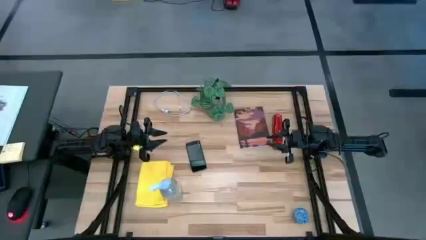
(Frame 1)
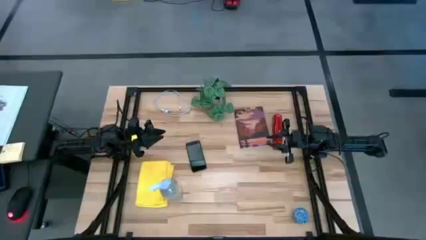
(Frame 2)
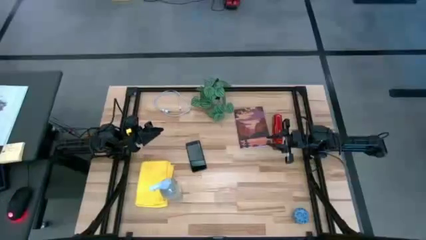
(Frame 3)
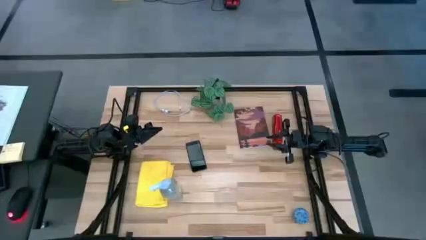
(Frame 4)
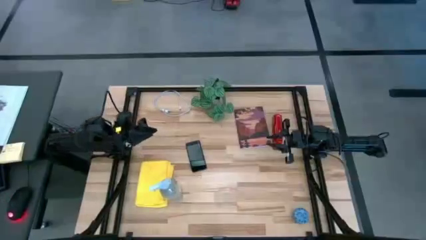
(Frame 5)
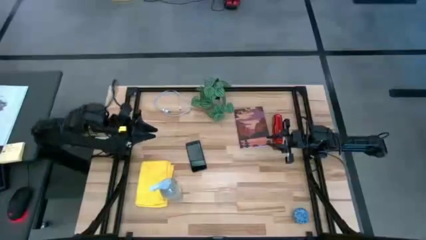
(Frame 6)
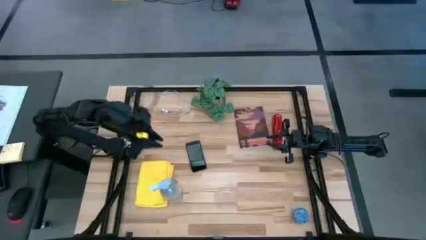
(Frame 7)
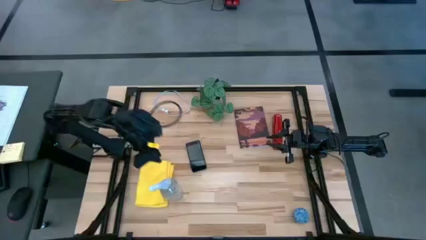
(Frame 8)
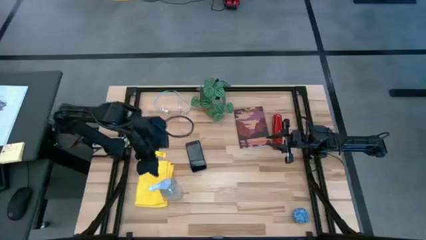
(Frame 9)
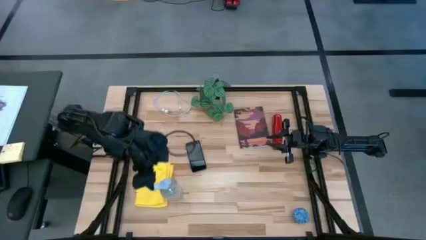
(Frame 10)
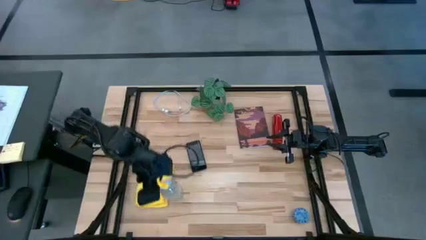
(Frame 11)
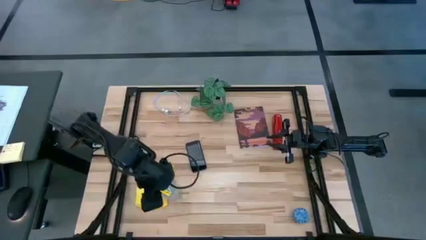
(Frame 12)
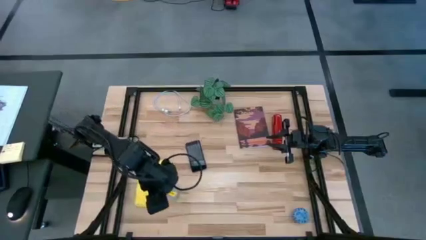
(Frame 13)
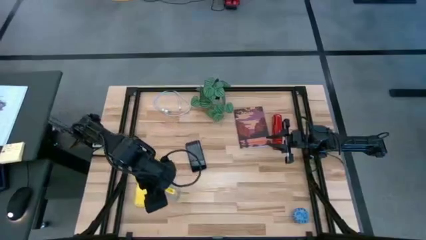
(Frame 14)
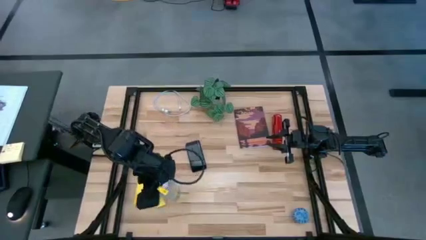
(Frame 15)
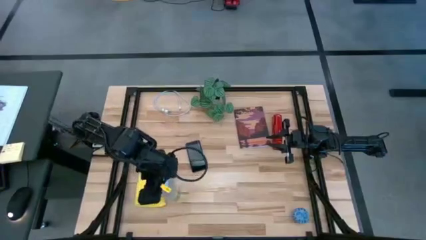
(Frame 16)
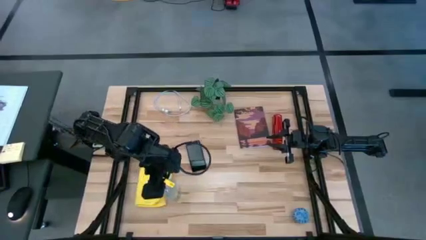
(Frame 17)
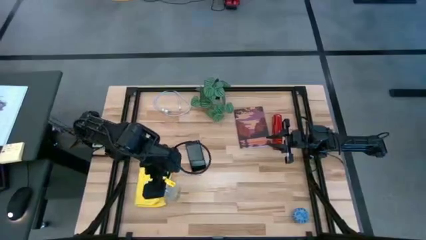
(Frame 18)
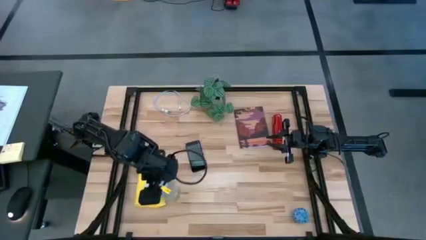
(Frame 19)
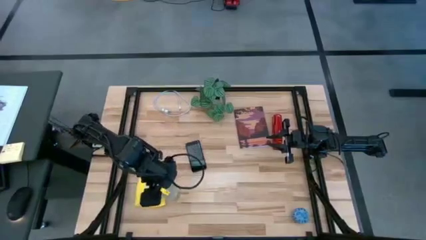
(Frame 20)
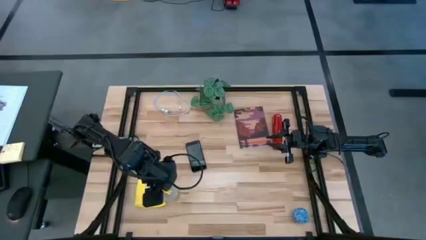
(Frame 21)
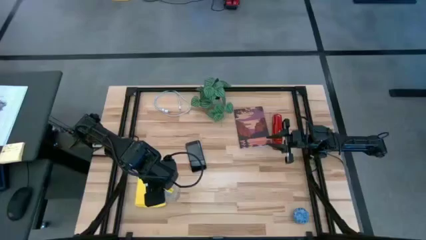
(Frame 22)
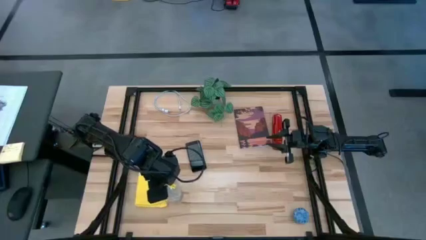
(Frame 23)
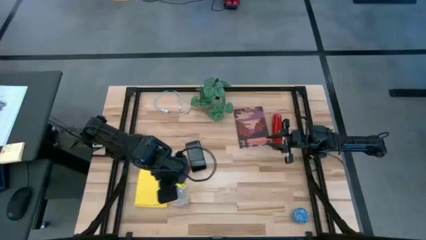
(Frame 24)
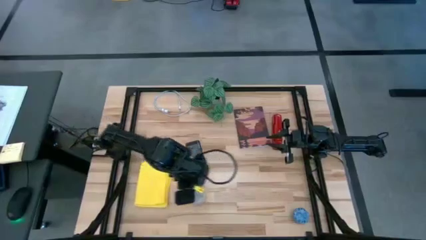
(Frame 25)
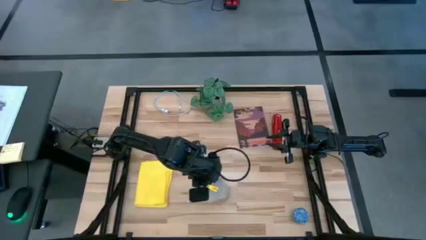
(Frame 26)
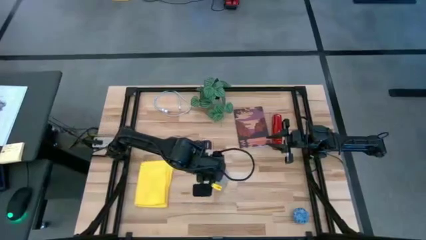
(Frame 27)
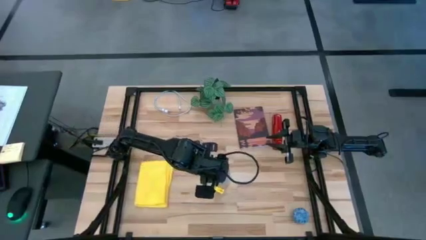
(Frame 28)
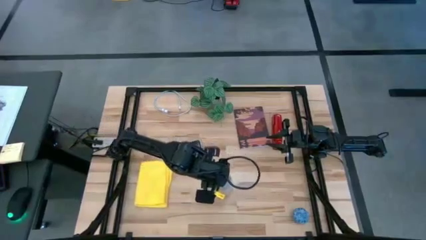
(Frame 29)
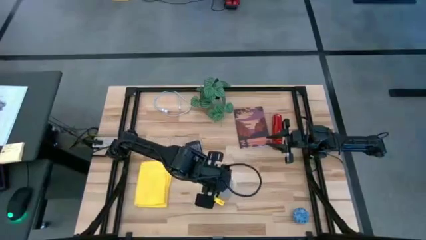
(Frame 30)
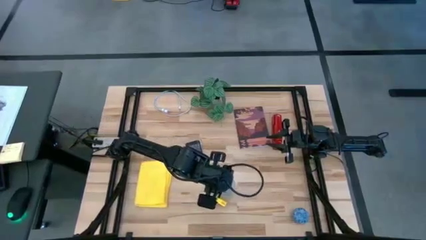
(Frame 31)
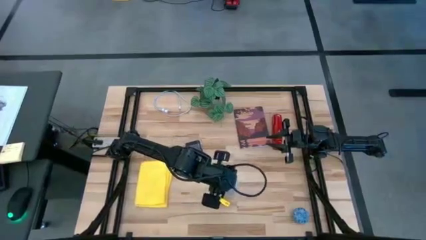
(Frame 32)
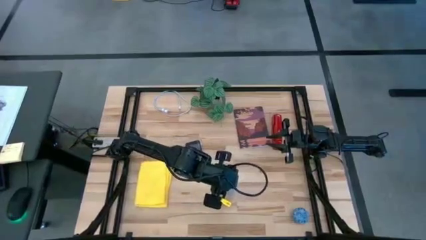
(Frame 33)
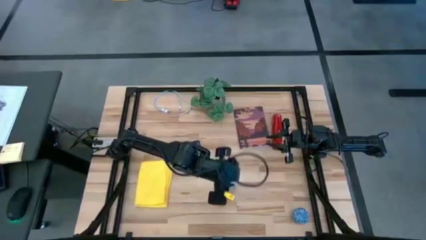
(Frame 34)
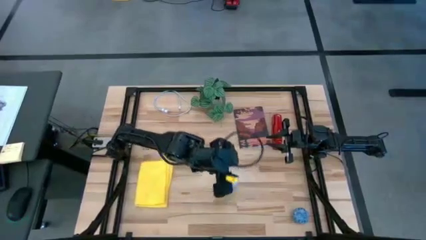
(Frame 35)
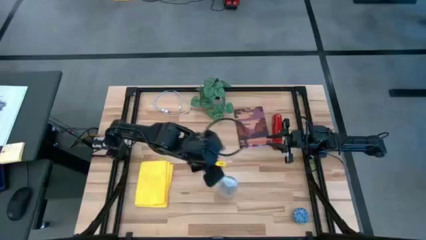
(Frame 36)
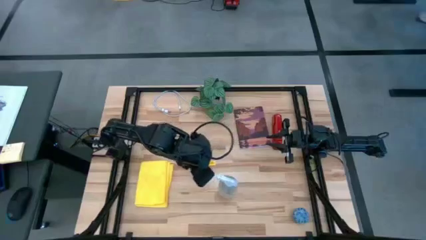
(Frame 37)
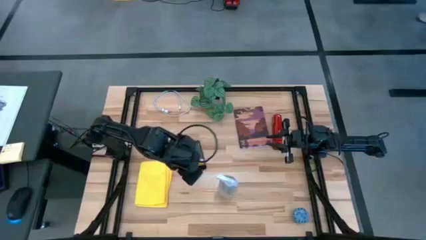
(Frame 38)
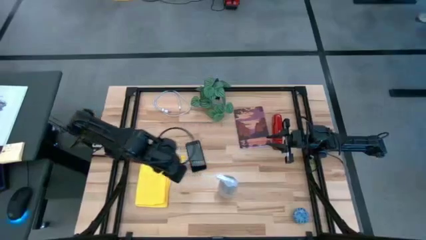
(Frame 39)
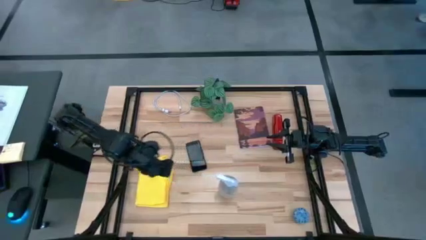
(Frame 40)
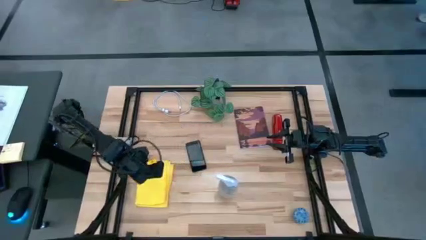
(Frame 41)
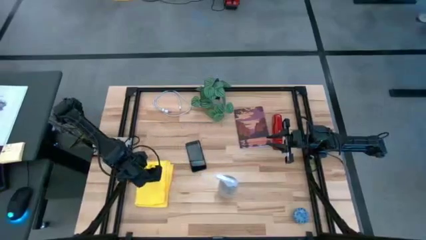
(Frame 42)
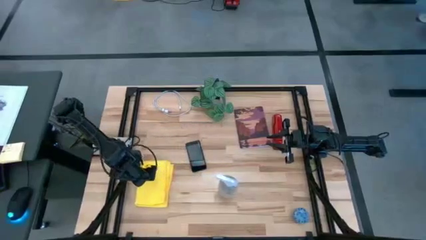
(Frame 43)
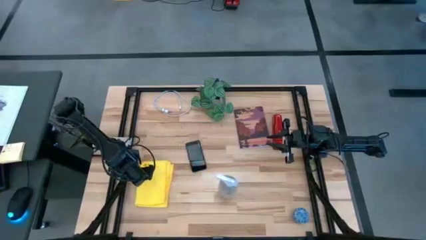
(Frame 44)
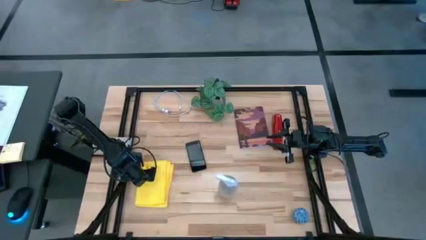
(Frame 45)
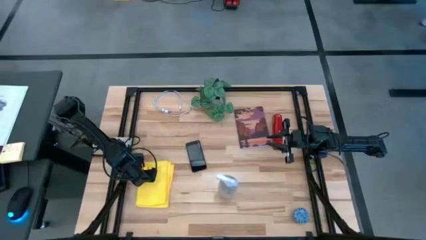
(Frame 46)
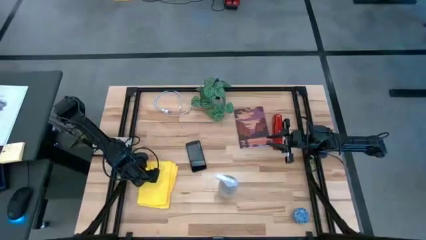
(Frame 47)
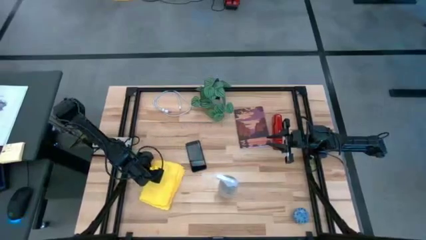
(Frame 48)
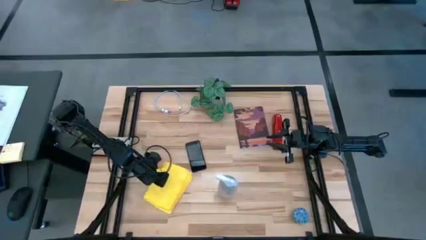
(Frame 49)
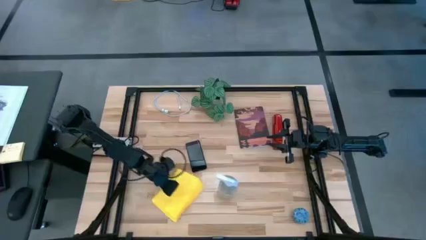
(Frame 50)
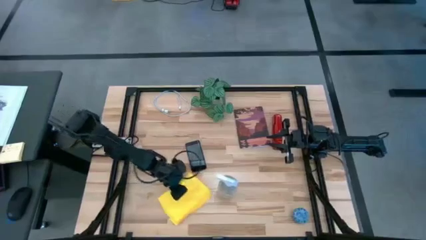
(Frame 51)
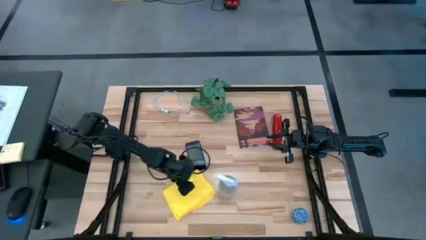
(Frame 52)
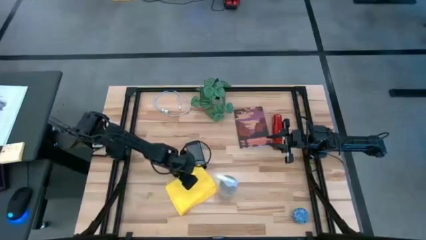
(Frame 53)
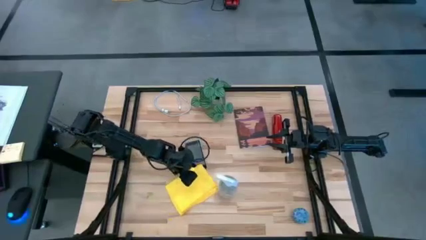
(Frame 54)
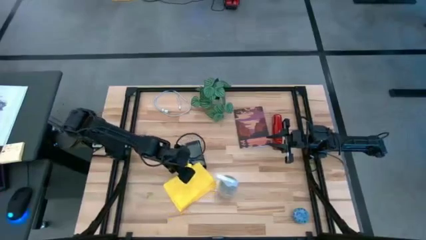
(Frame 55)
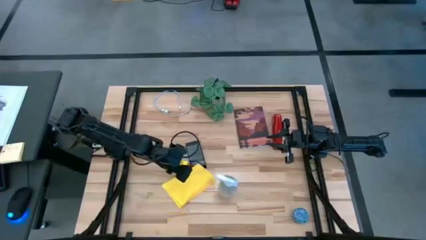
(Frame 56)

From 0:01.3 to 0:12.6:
Task: Apply microfiber cloth
Prepare the transparent spray bottle and yellow microfiber towel

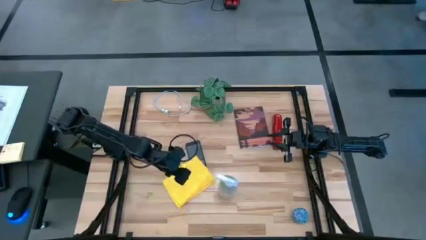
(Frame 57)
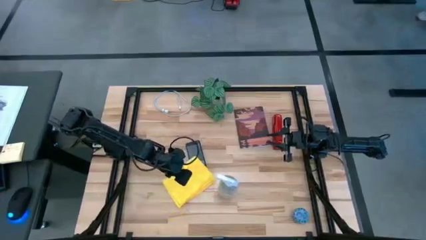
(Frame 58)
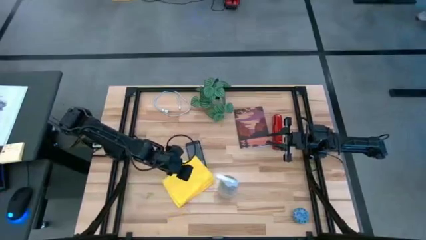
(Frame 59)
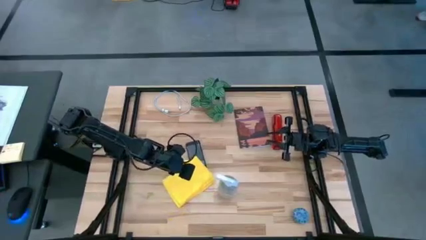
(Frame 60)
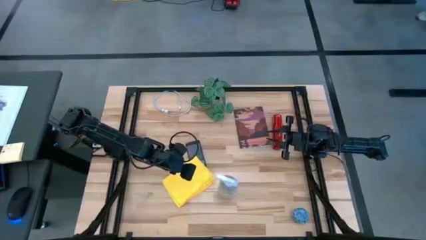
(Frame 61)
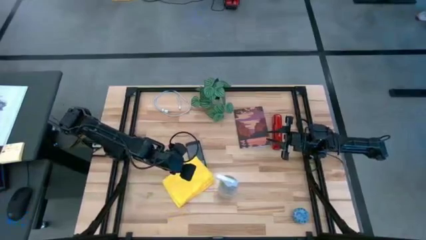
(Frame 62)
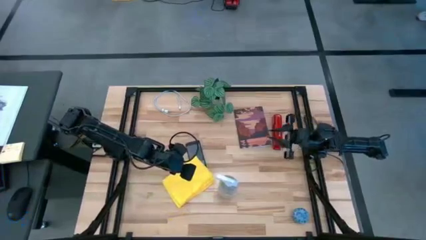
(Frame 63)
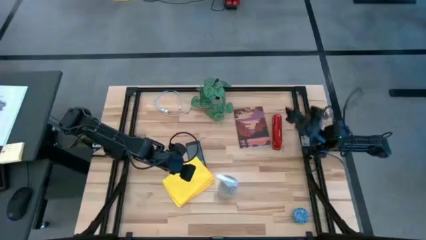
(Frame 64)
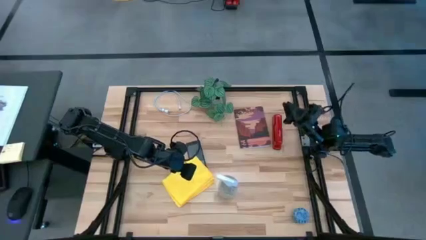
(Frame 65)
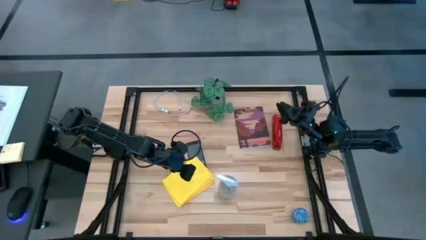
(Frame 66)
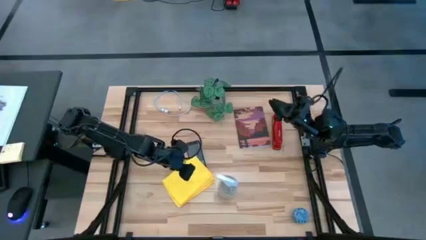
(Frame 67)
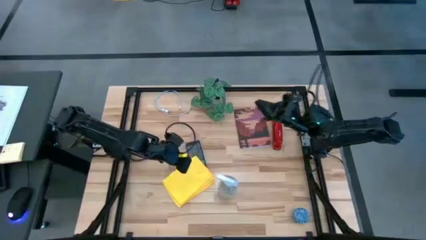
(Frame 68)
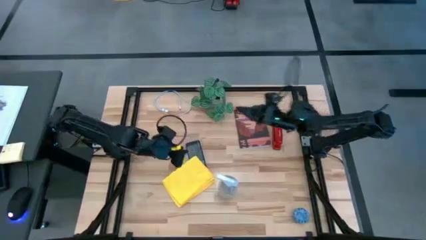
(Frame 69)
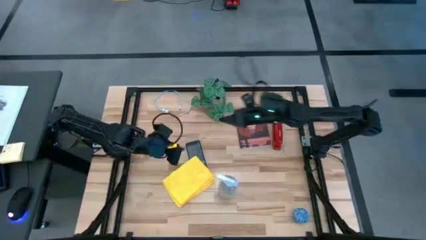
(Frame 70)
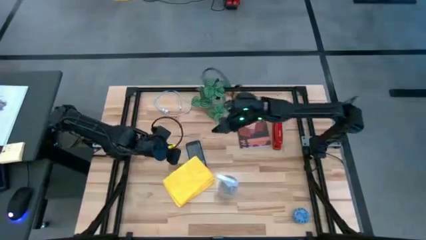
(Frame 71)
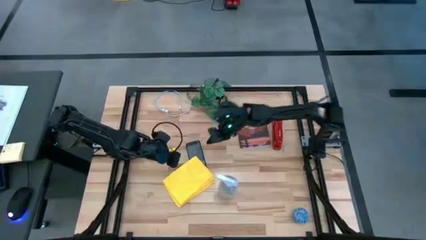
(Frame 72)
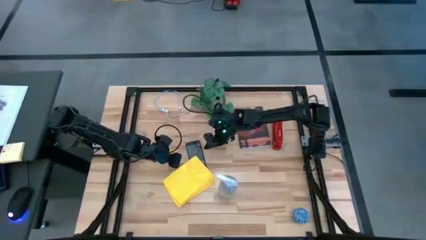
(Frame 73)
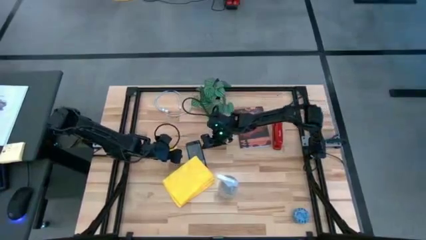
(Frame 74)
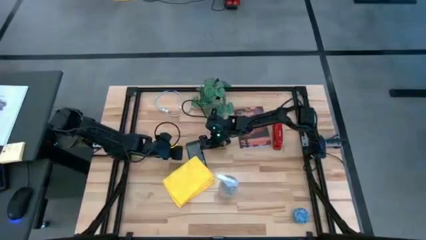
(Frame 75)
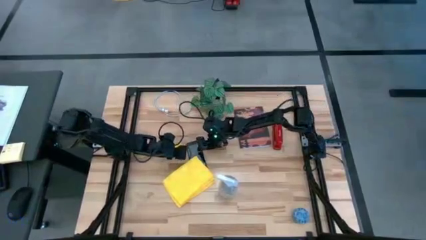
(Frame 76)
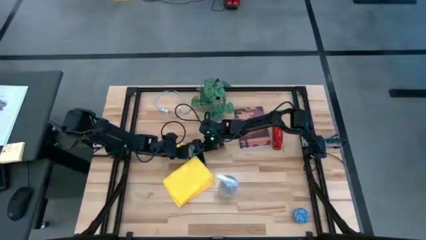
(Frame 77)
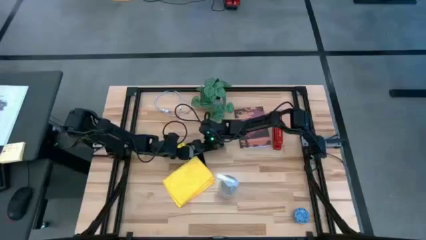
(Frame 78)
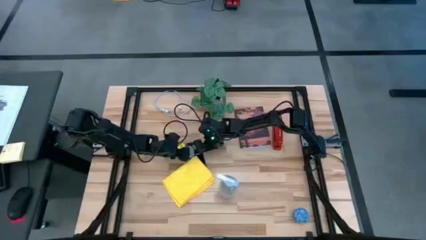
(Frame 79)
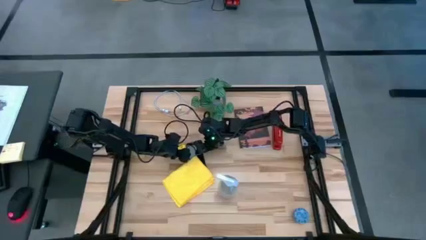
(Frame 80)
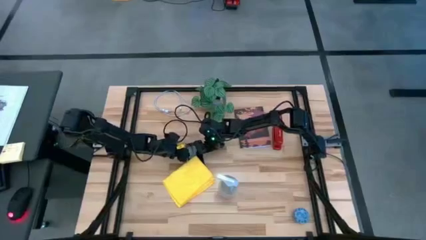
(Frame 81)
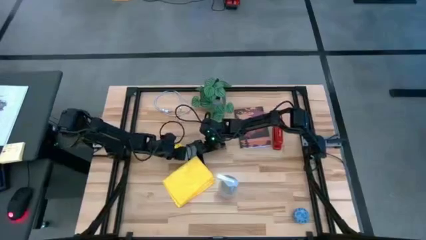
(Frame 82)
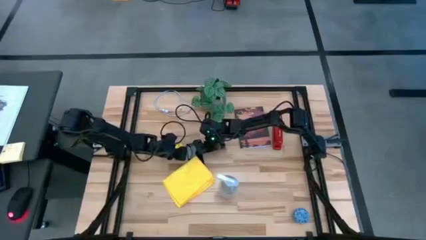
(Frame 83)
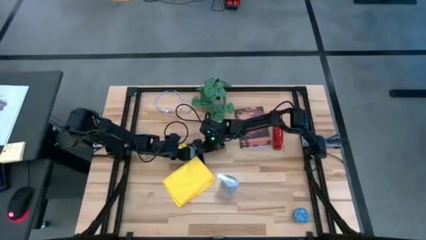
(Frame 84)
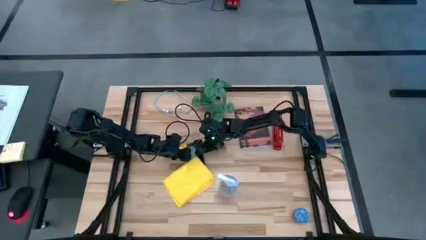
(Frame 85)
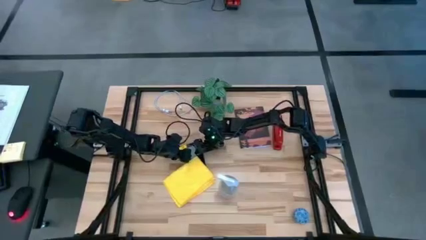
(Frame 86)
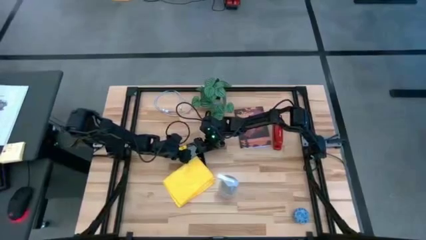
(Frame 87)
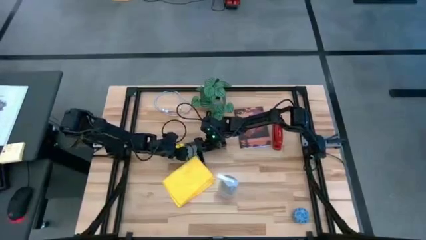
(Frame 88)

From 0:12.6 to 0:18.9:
Spray the back of the black cellphone with the transparent spray bottle
